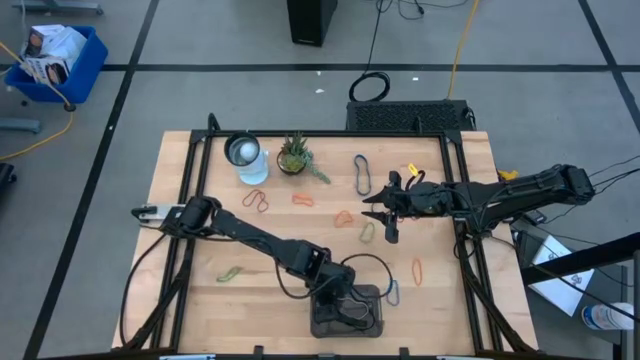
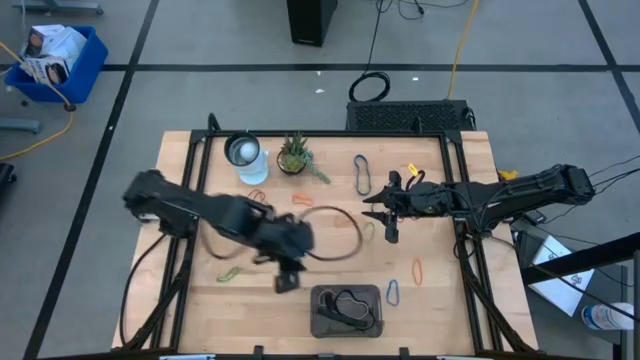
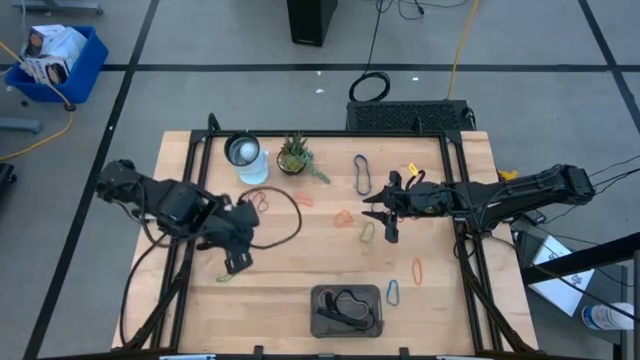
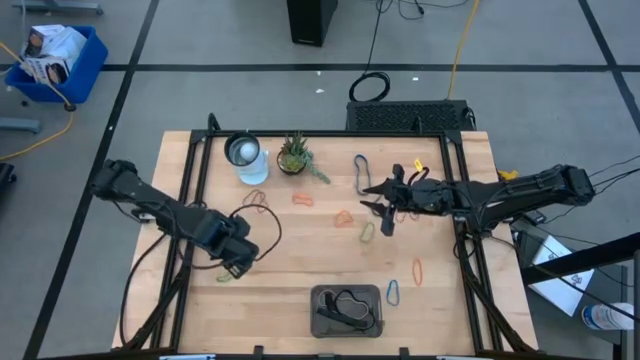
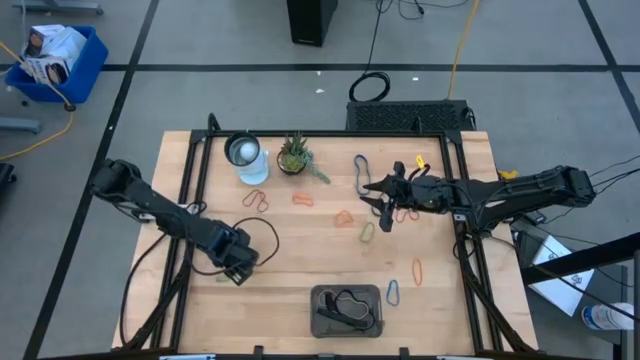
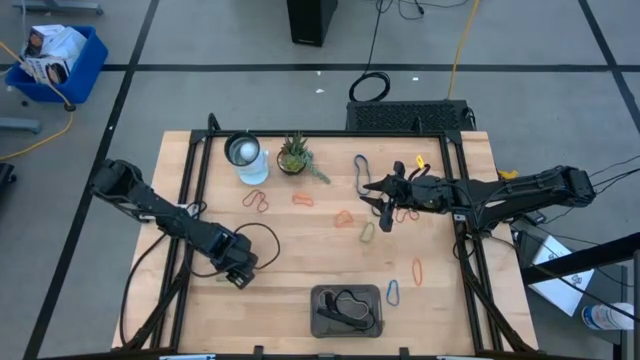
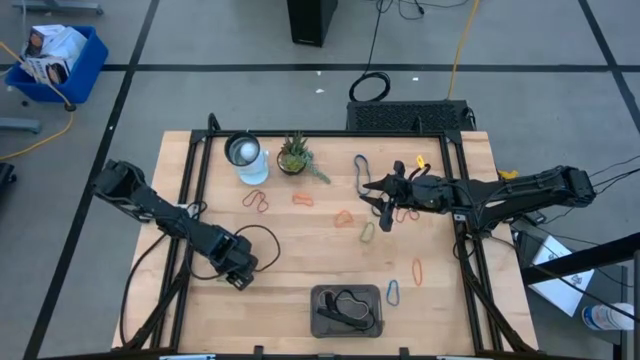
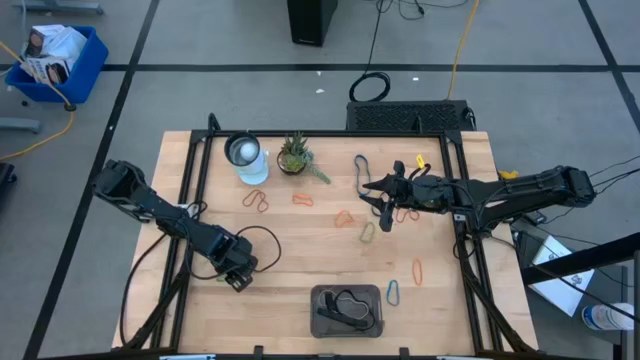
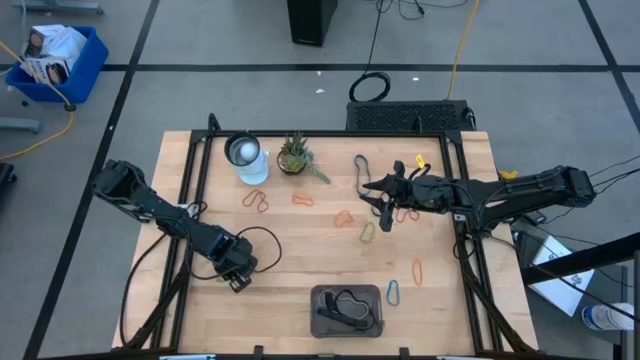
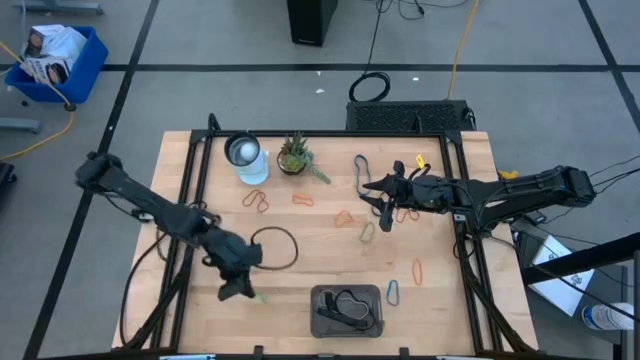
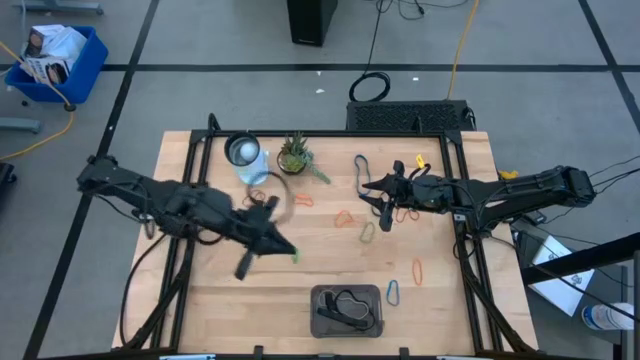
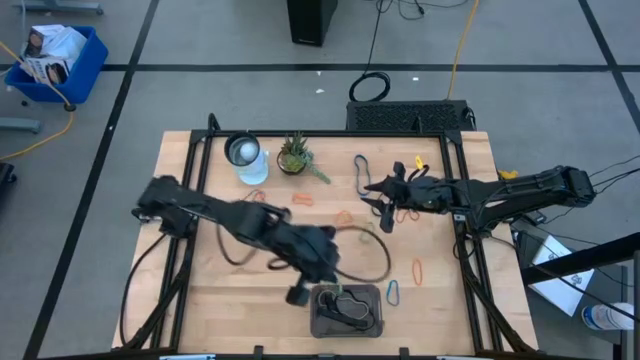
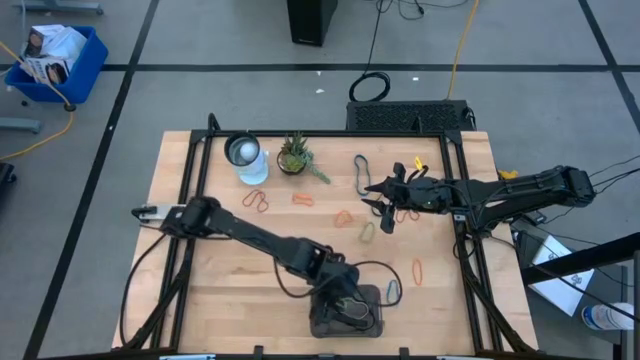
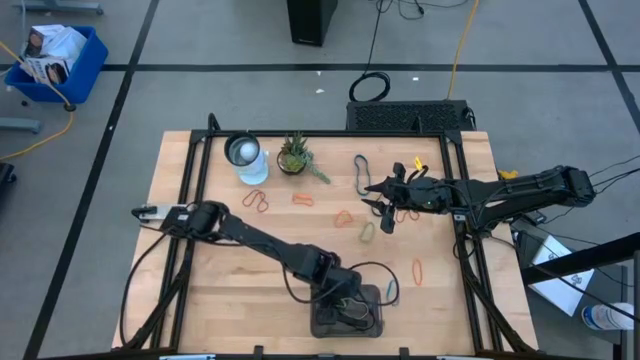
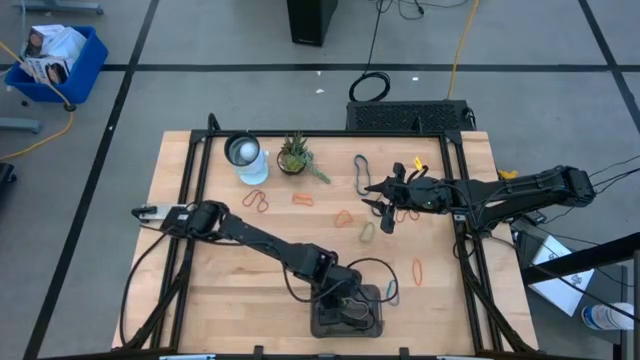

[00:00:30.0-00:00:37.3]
Task: Pick and place rubber bands into bin
Put the green rubber band into the black transparent bin

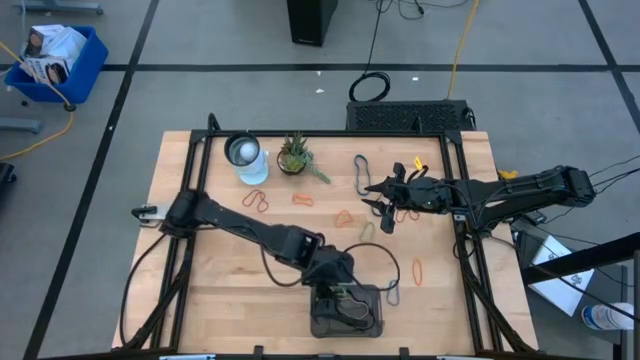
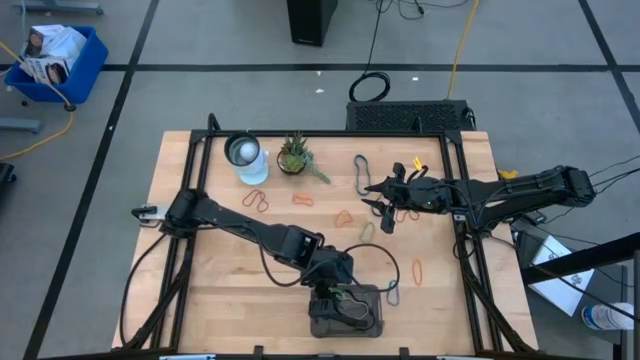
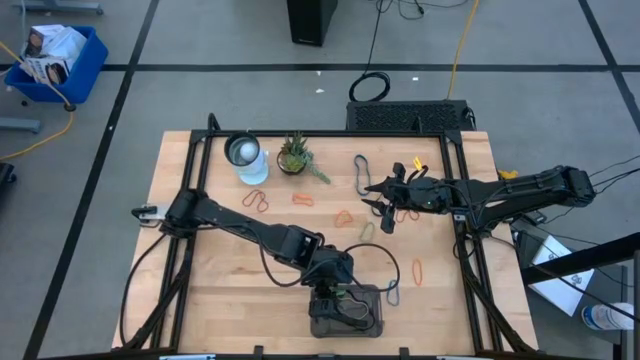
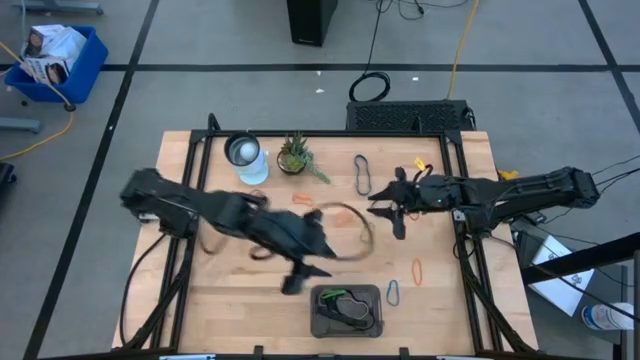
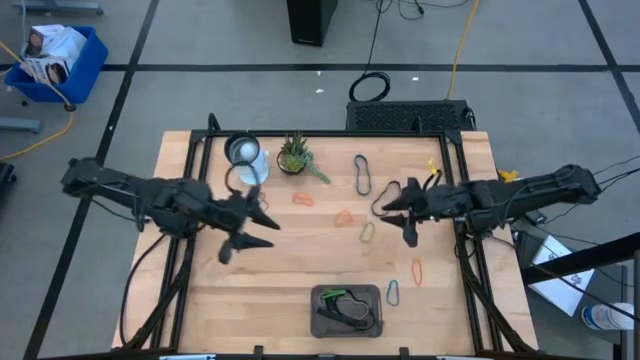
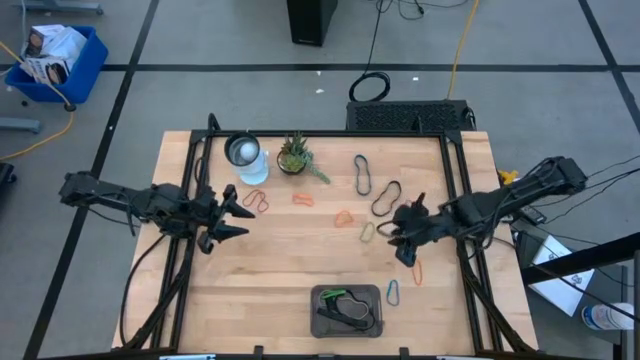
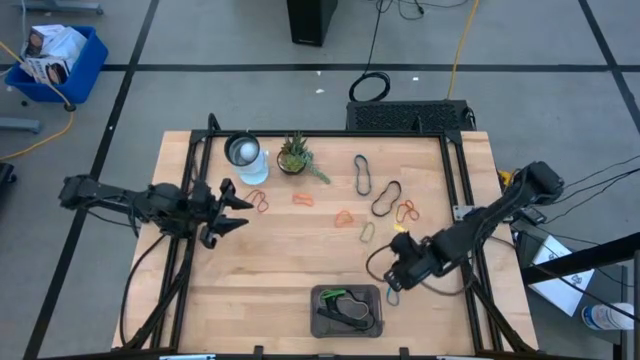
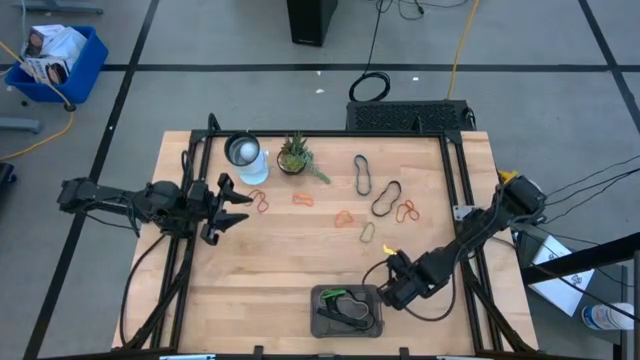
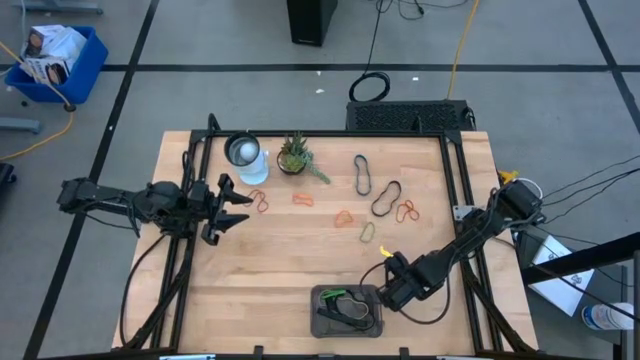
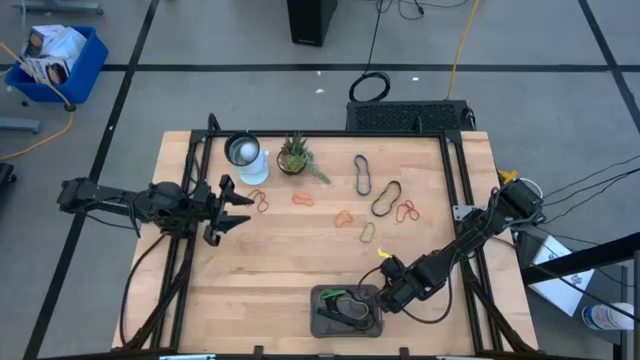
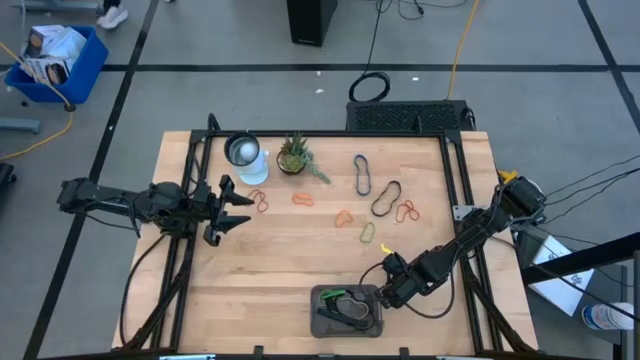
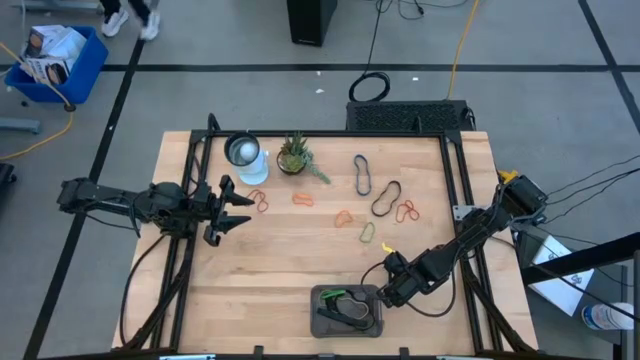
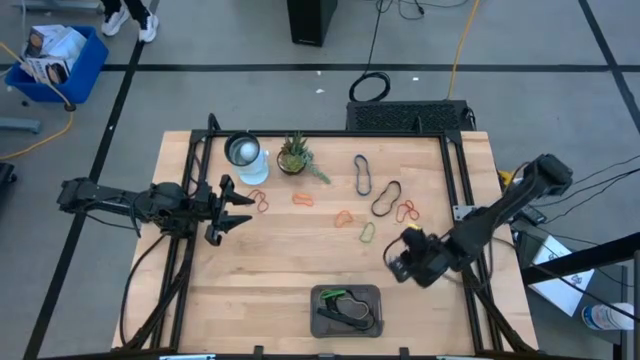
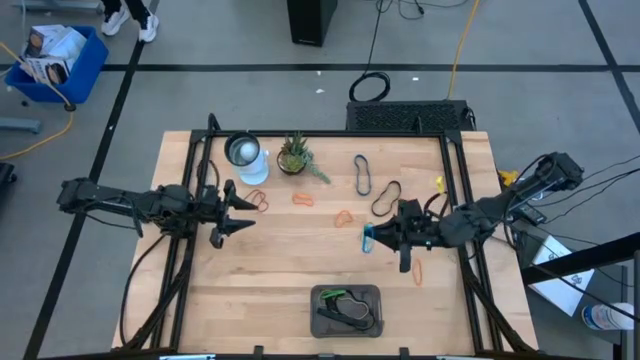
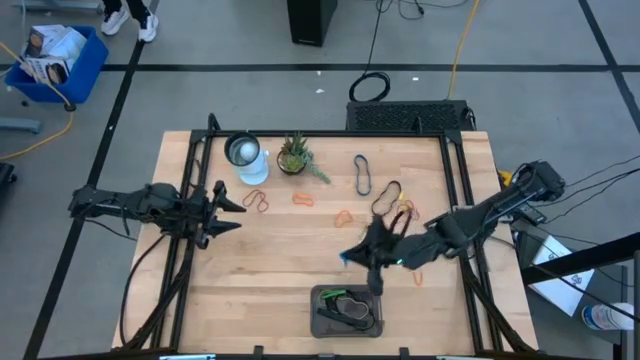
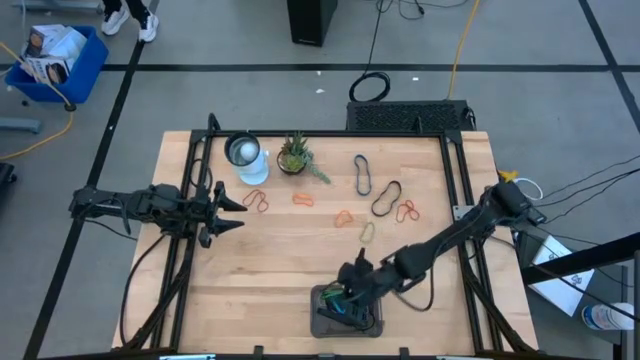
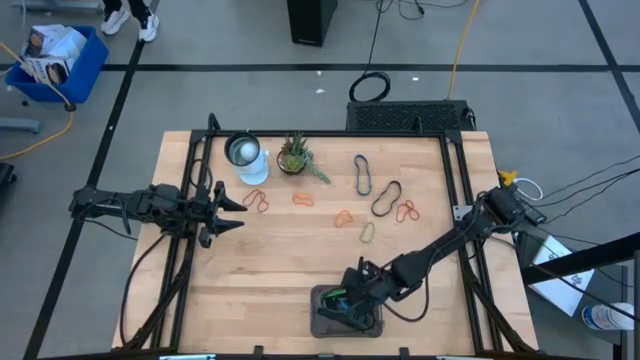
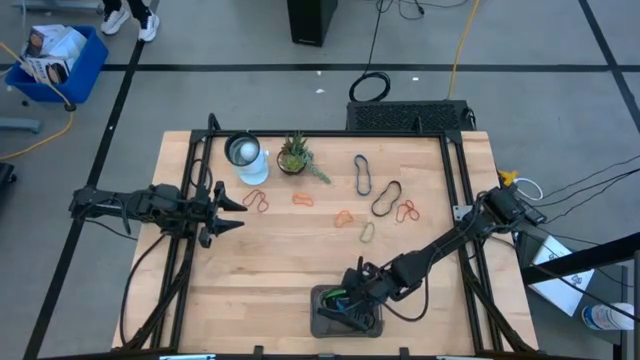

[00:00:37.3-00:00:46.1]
Put the blue rubber band into the black transparent bin

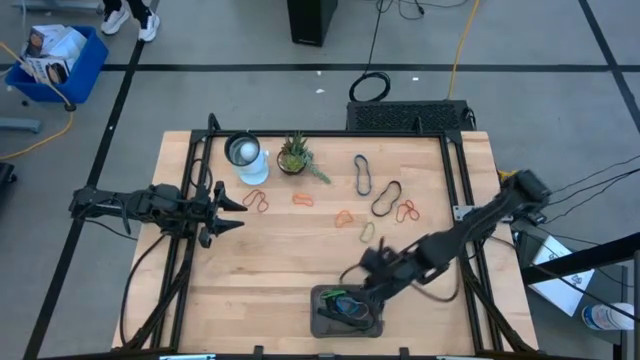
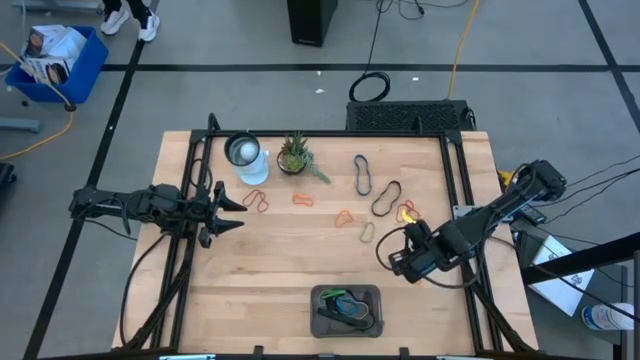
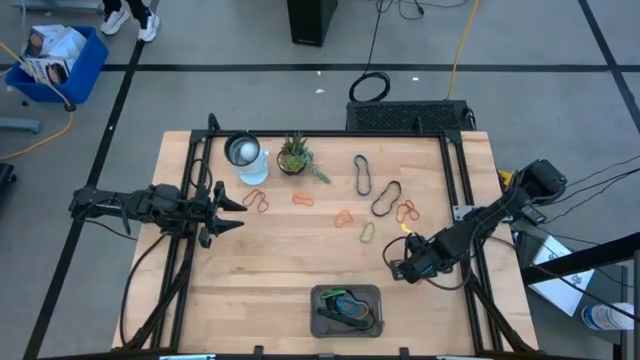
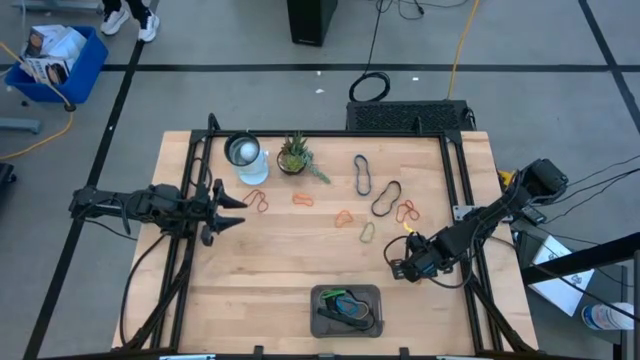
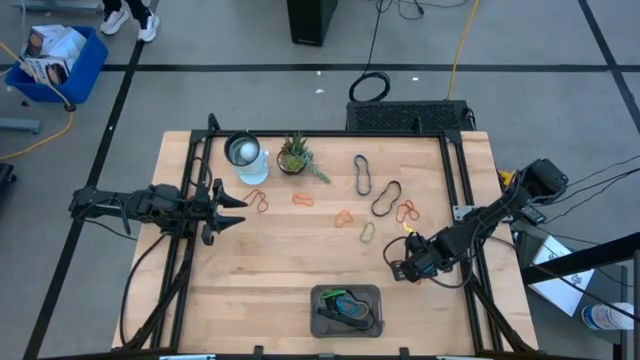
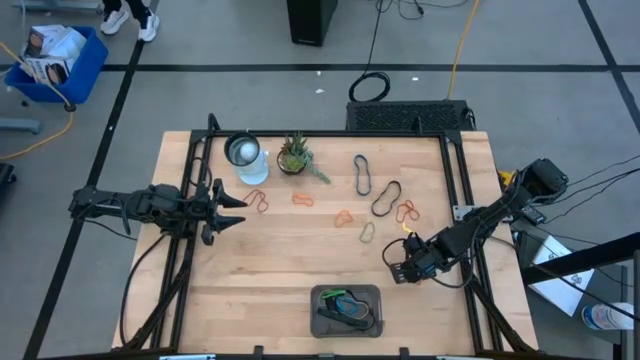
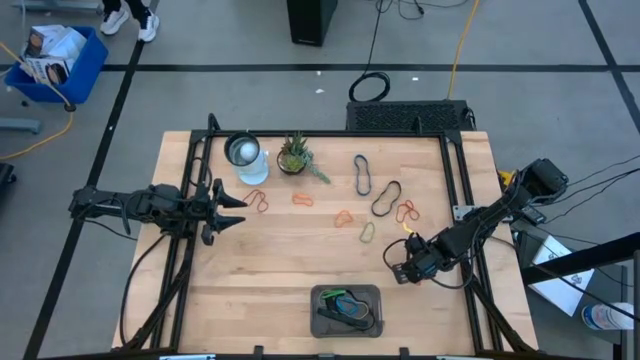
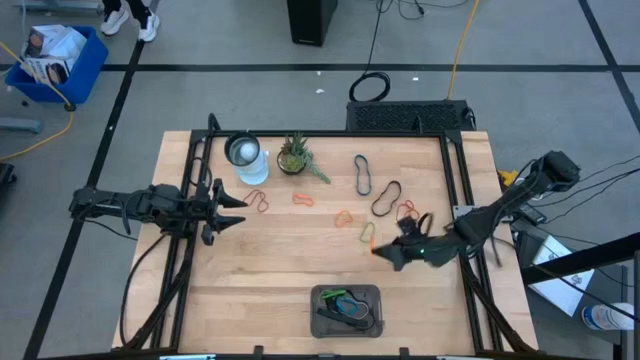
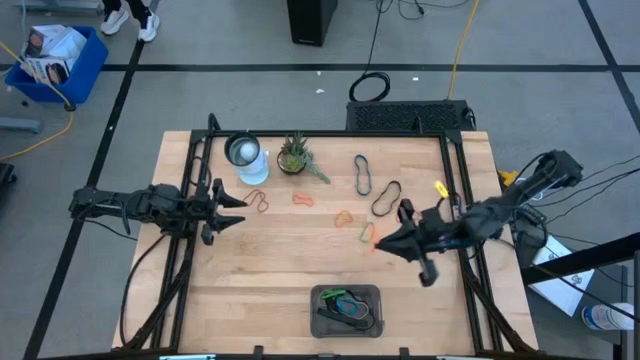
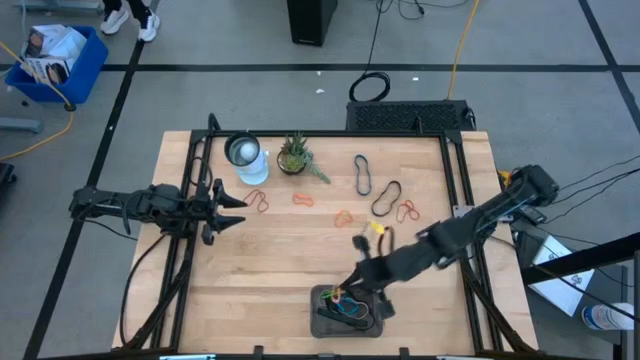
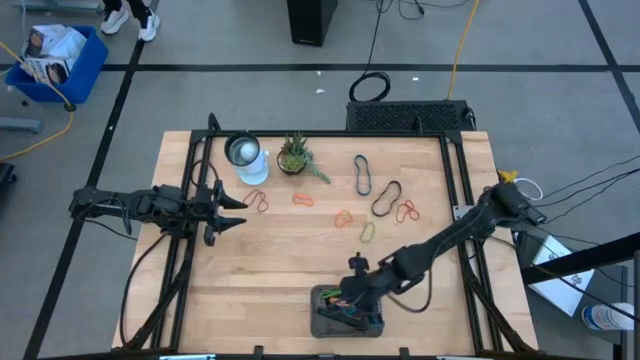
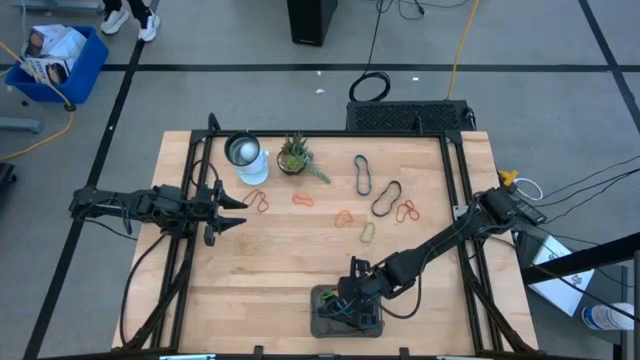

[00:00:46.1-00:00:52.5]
Put the orange rubber band into the black transparent bin
